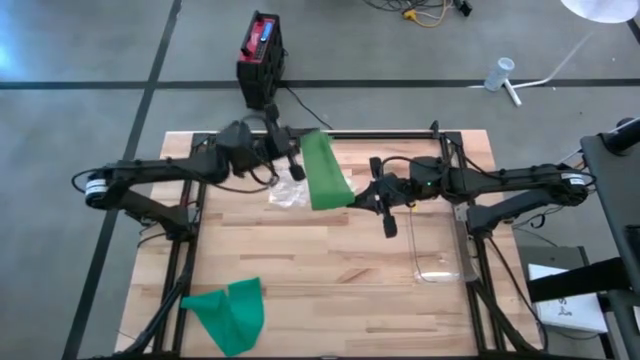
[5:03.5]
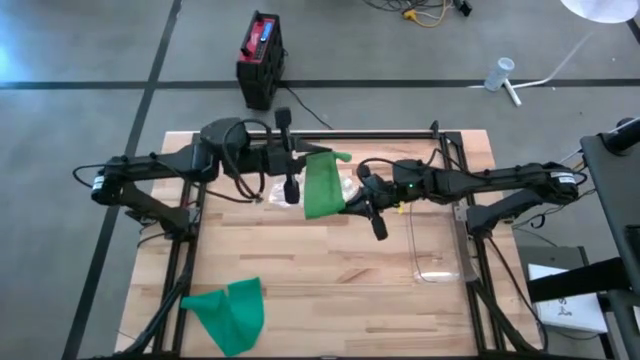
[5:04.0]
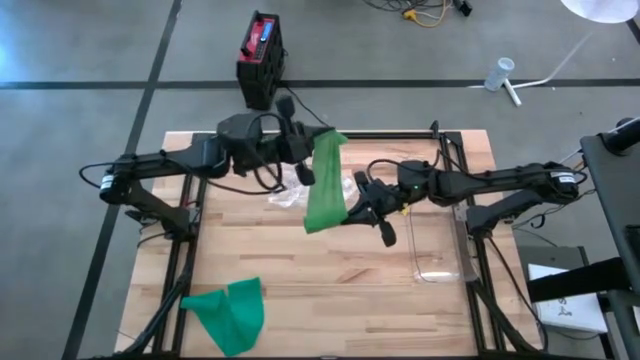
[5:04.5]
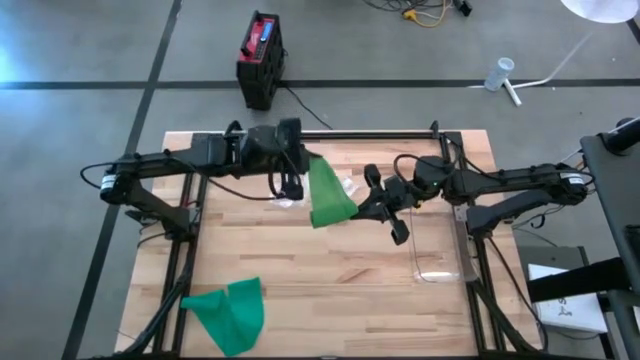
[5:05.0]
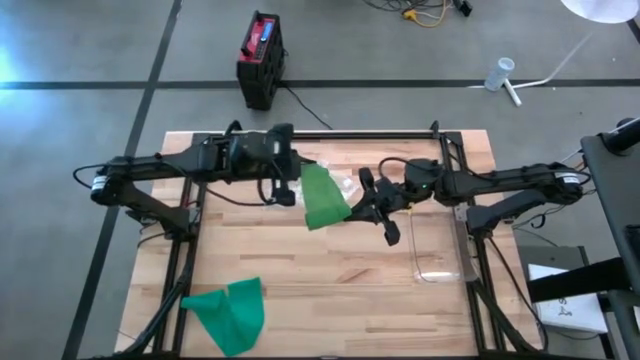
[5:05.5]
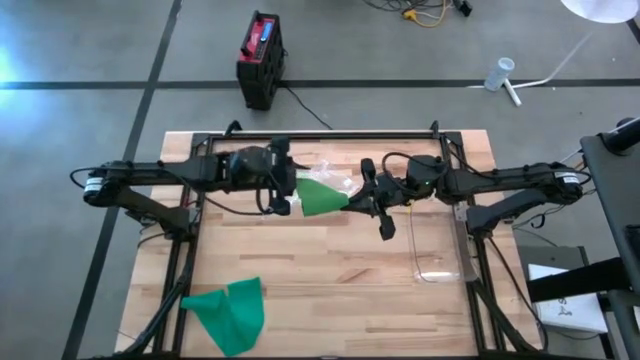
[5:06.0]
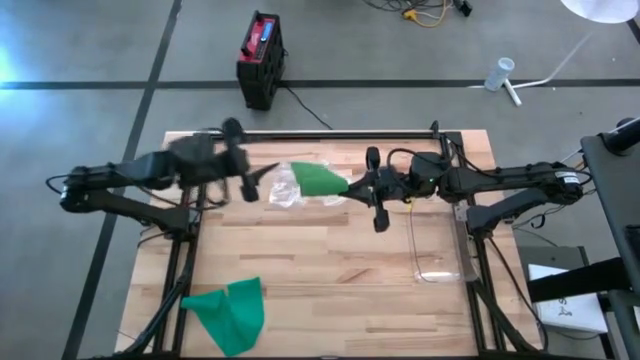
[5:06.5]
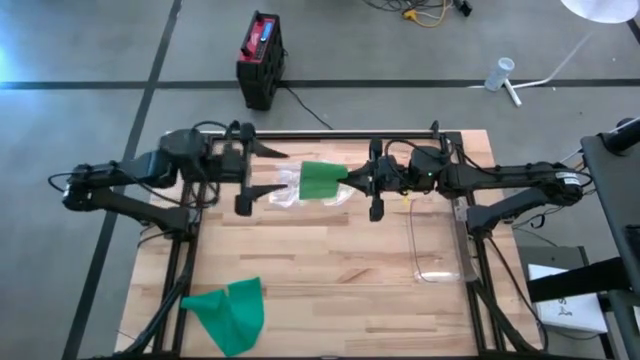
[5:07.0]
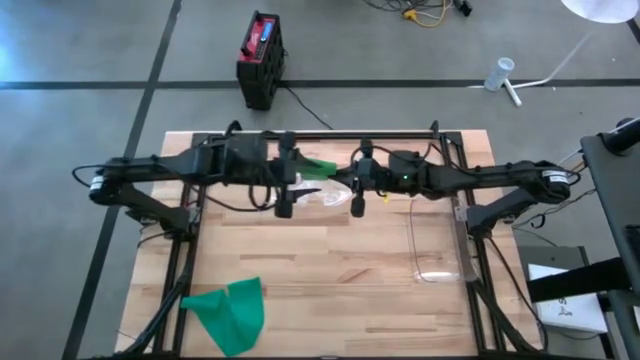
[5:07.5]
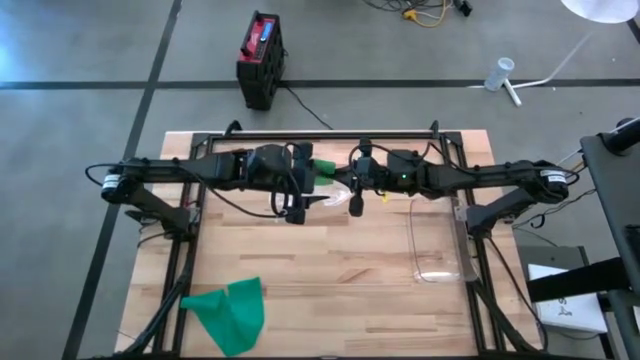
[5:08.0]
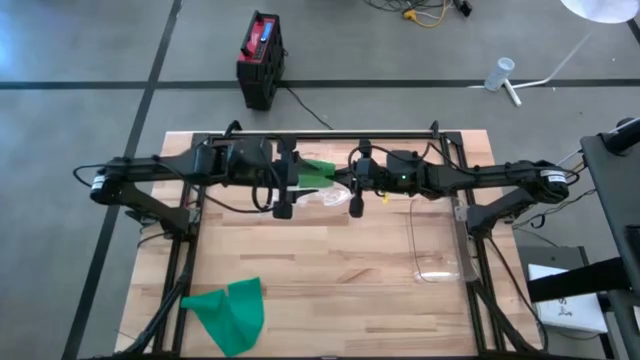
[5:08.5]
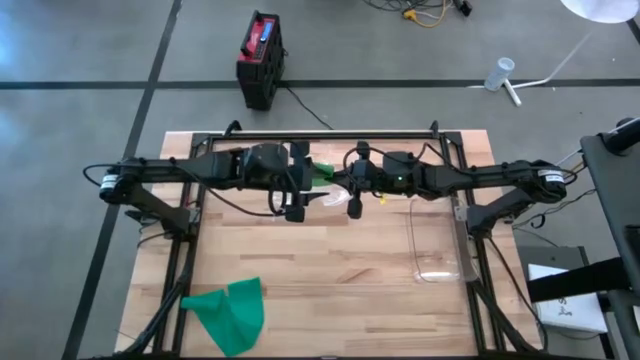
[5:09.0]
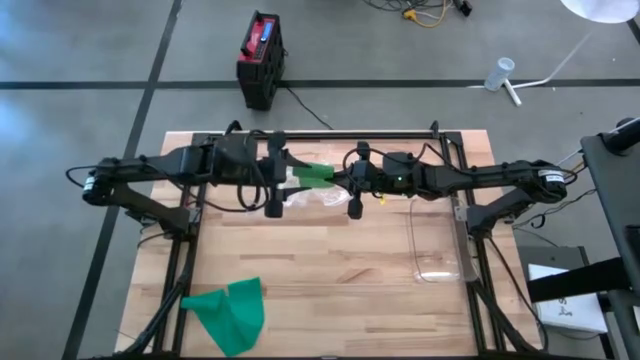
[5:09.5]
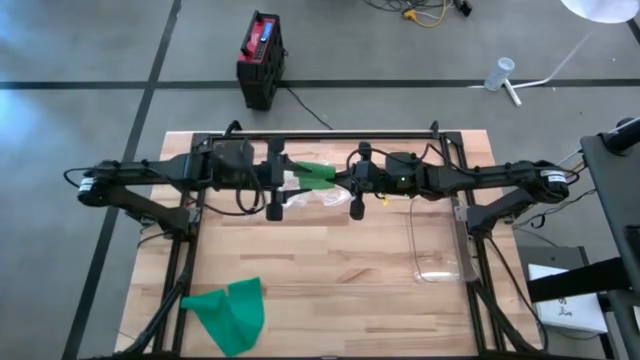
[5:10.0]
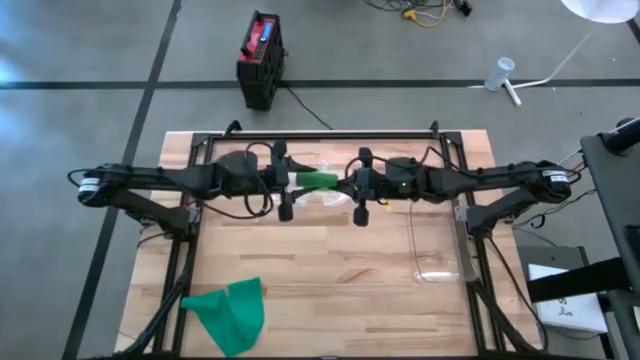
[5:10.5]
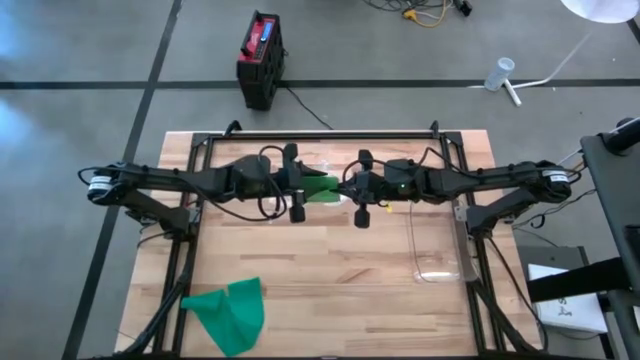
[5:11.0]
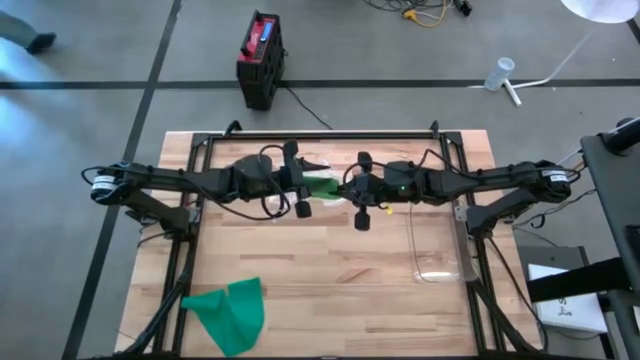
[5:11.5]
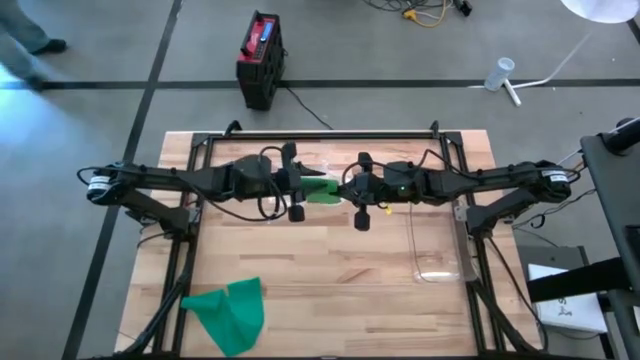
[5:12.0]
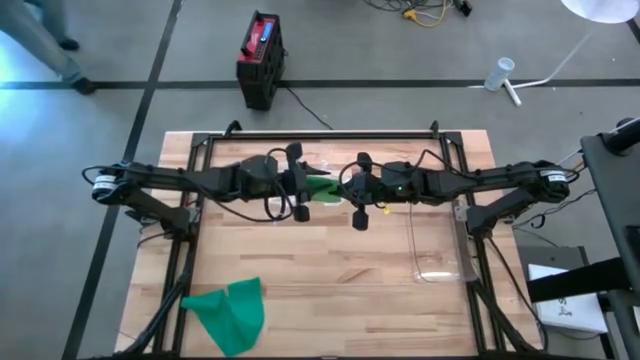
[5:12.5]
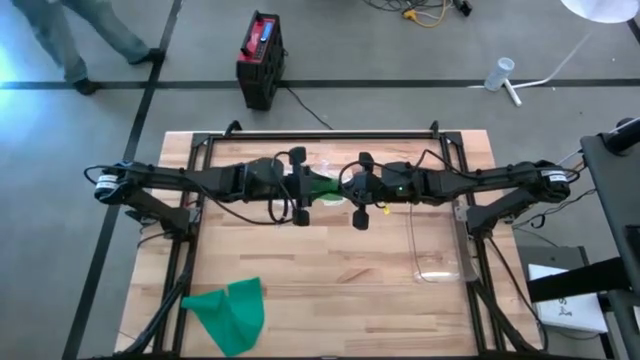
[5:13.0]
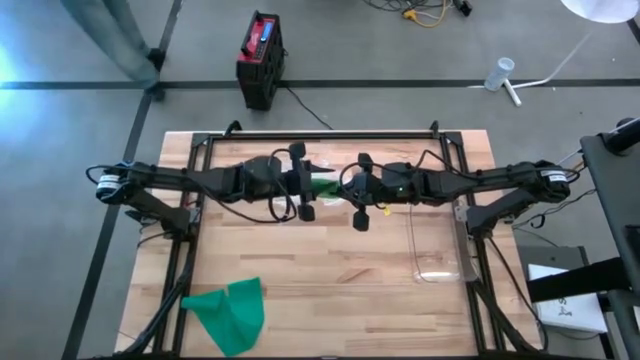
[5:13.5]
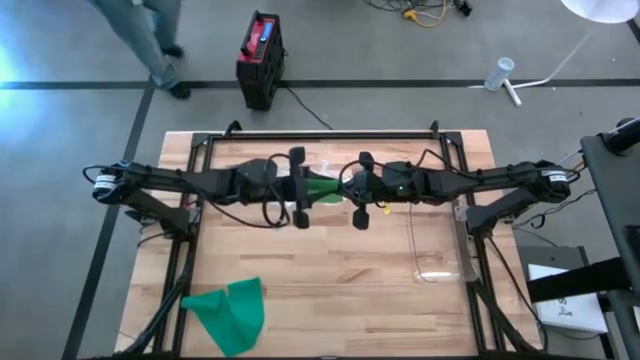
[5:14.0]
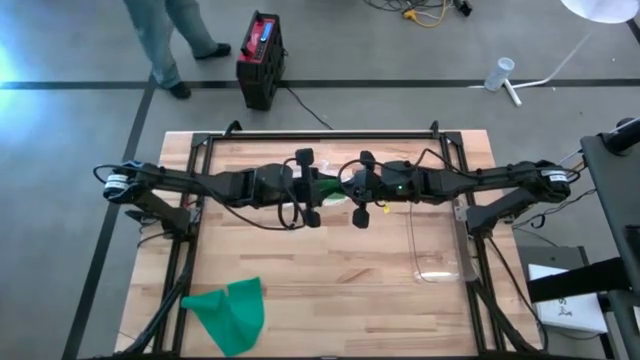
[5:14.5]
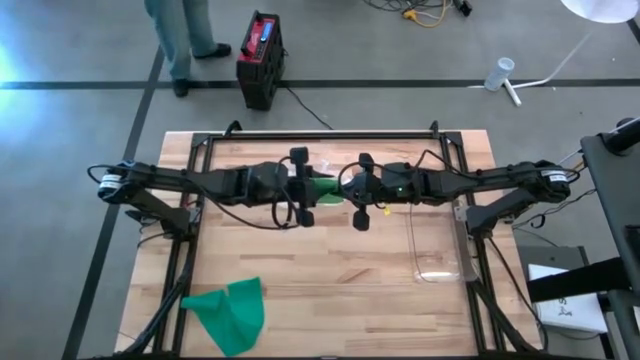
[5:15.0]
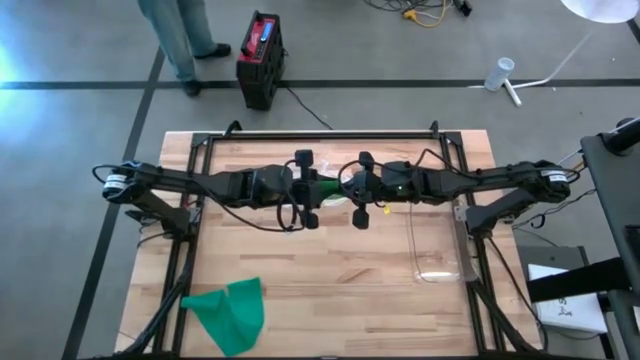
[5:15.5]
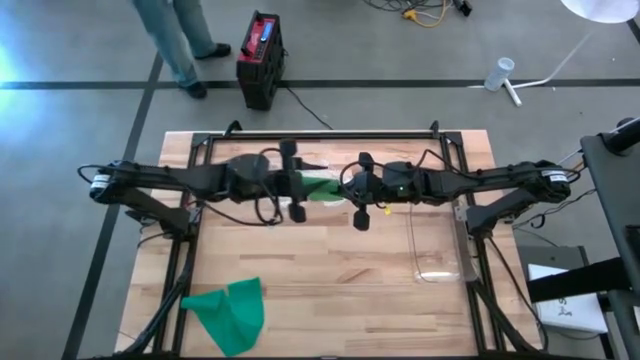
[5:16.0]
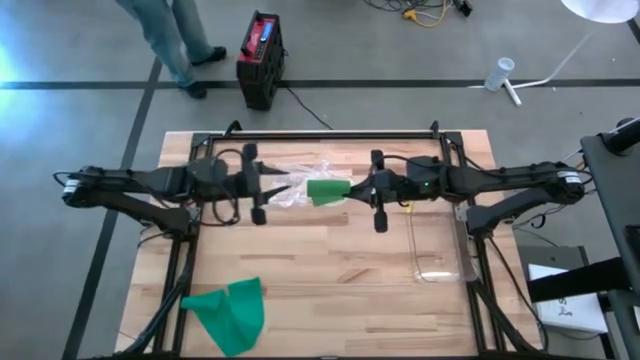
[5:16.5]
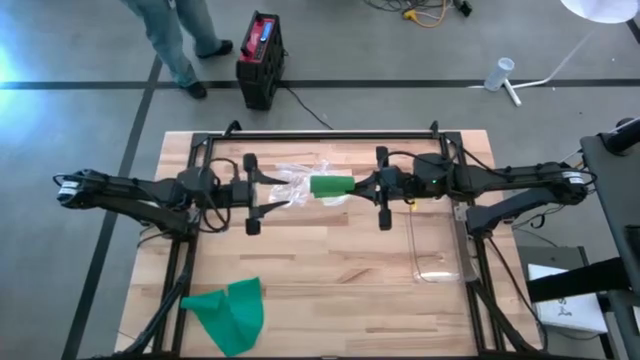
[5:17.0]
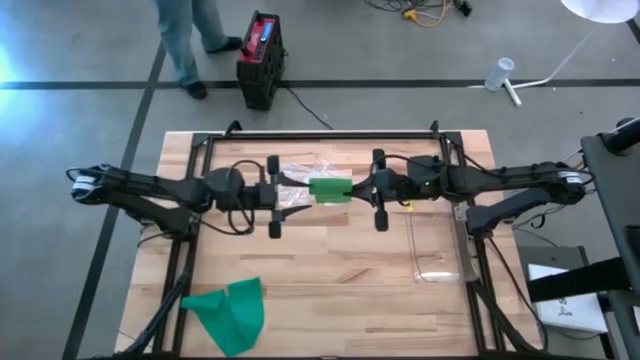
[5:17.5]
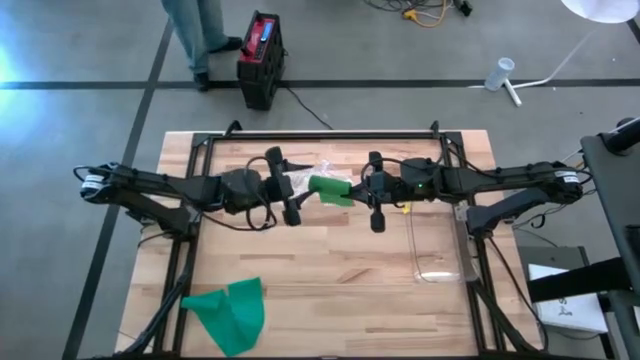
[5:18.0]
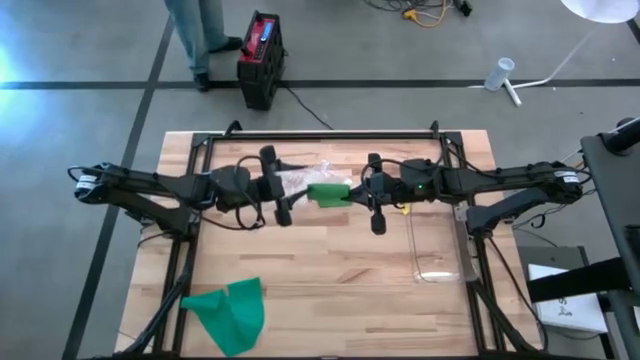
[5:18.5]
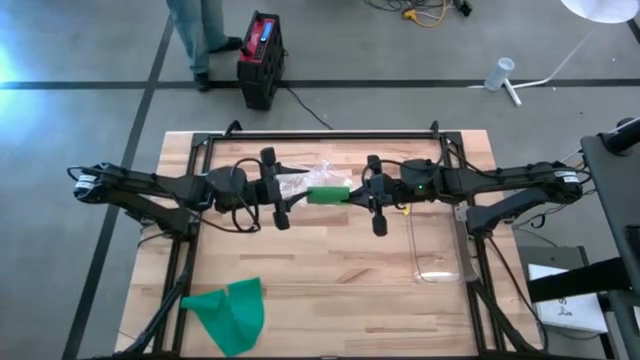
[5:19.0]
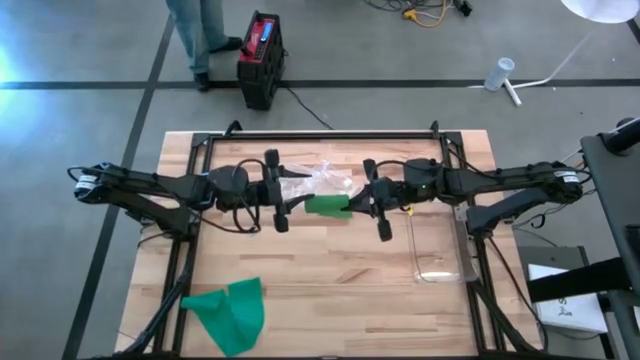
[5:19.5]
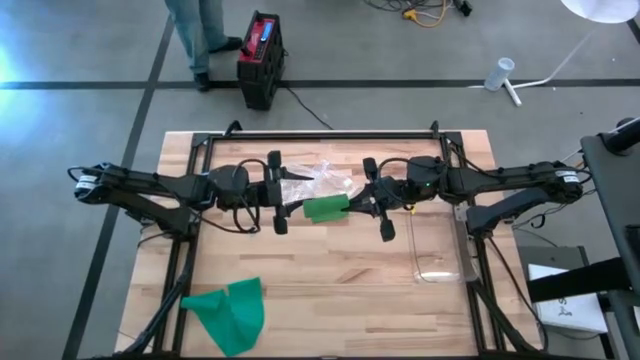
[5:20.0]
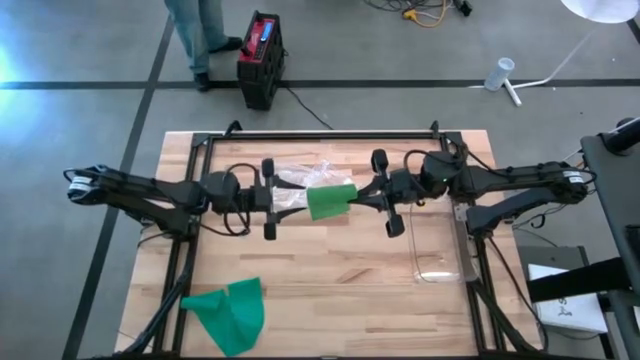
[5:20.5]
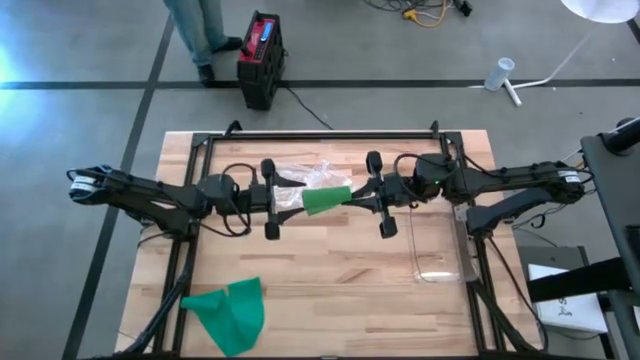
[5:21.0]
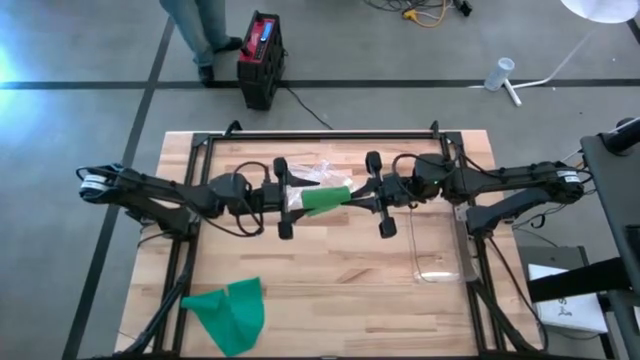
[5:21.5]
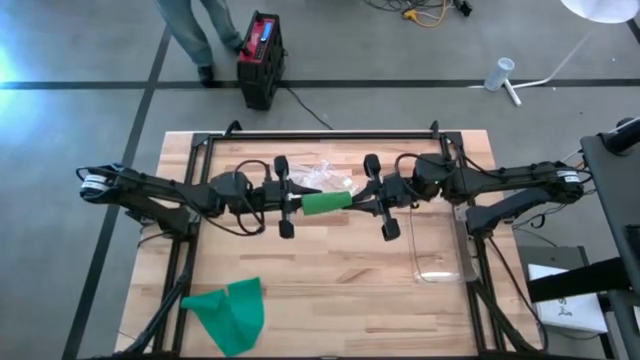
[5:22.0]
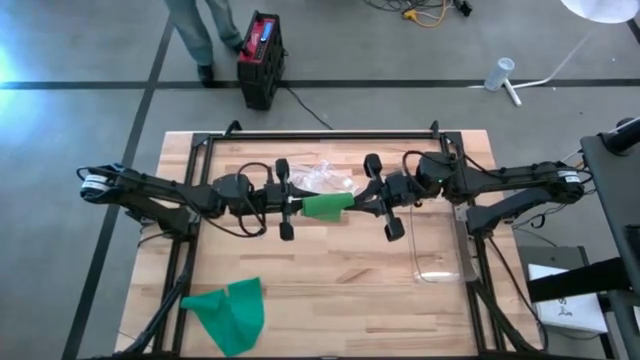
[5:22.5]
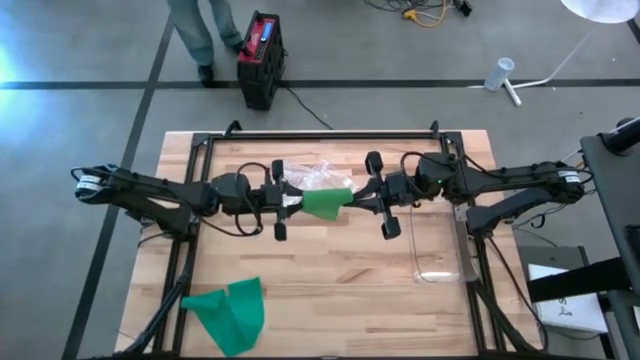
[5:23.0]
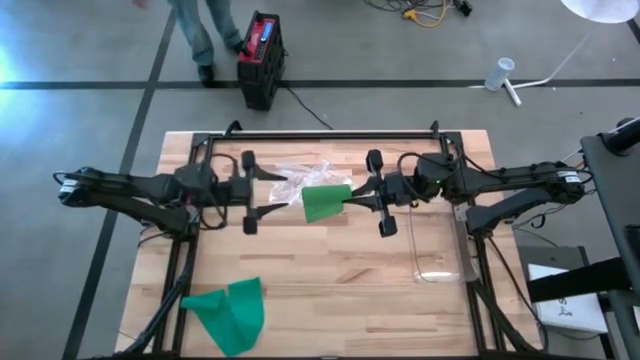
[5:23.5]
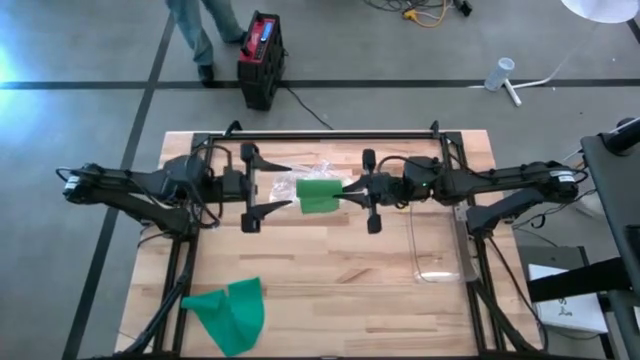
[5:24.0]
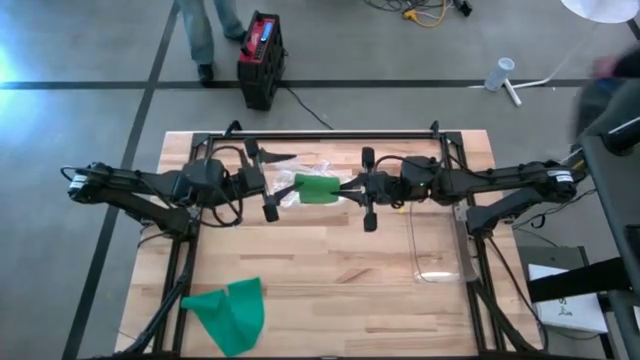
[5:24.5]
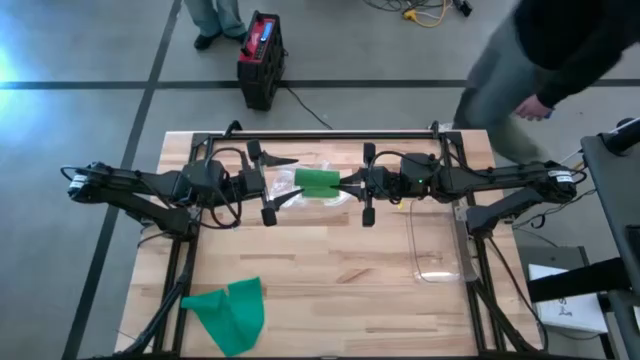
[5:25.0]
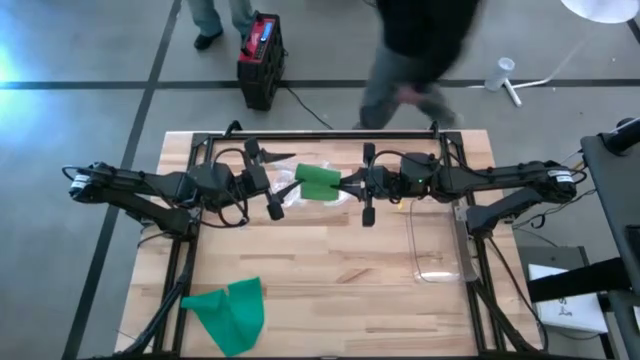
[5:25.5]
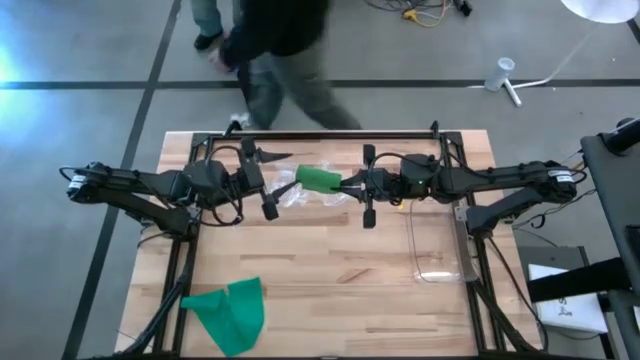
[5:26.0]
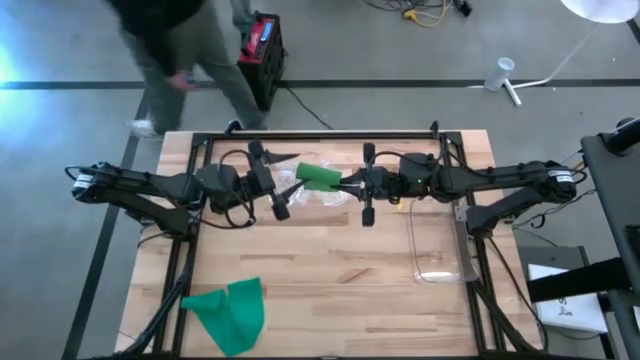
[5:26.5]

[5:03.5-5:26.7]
Task: Roll bandage
Roll the green bandage
